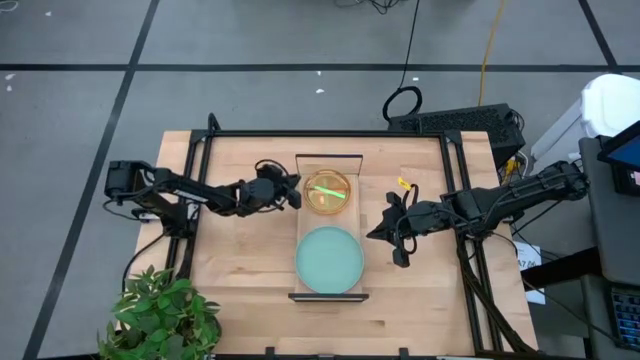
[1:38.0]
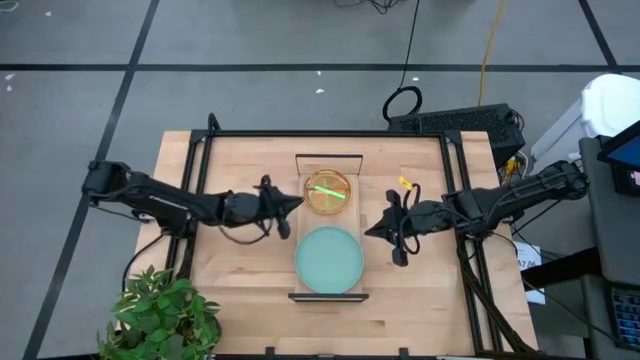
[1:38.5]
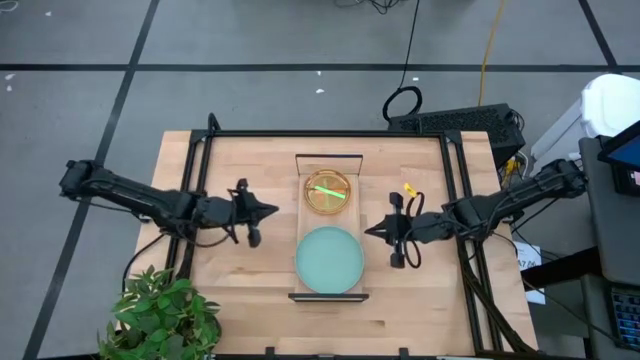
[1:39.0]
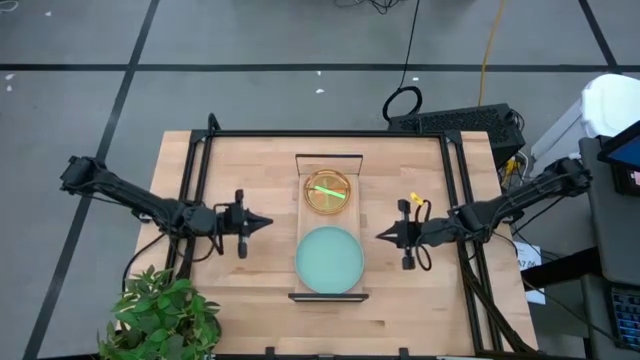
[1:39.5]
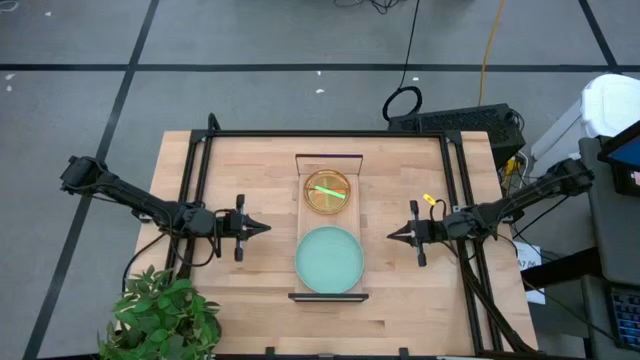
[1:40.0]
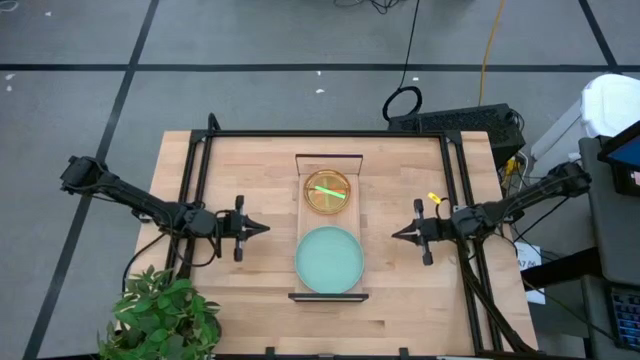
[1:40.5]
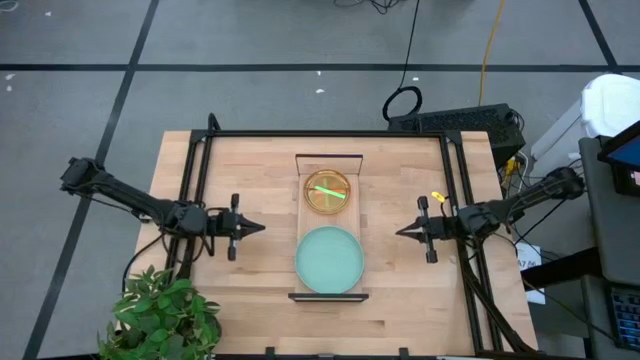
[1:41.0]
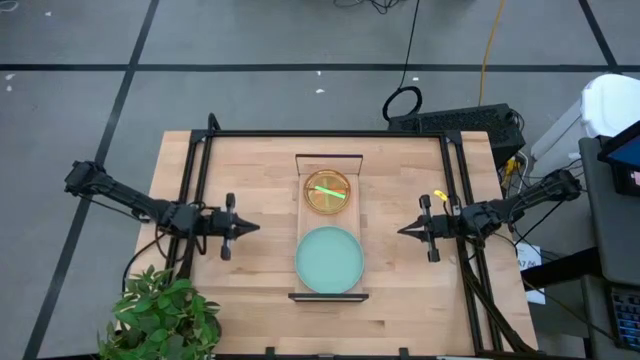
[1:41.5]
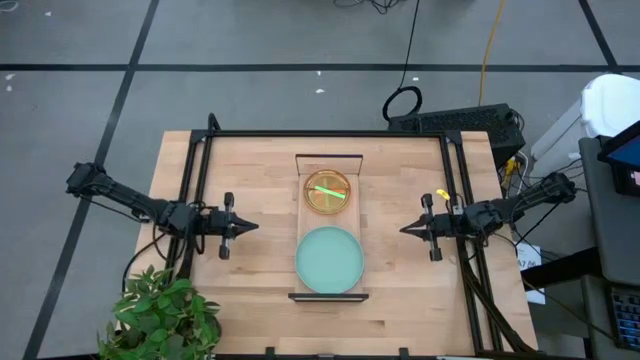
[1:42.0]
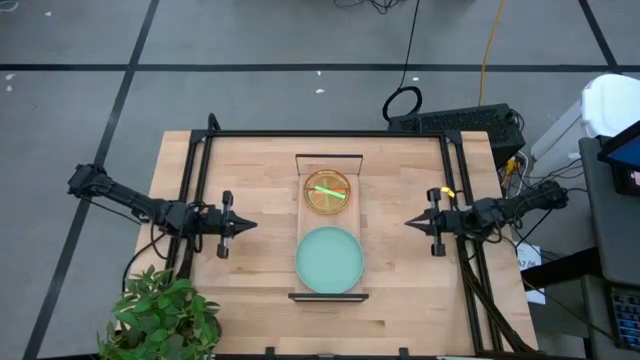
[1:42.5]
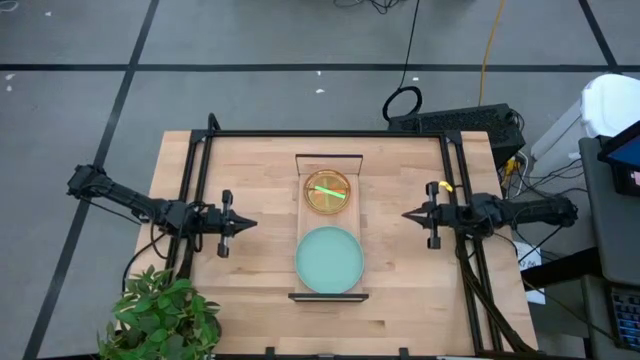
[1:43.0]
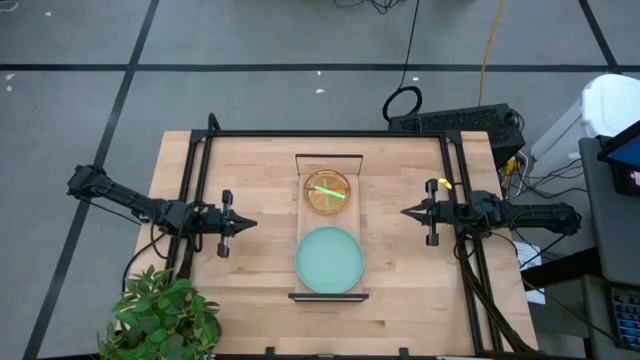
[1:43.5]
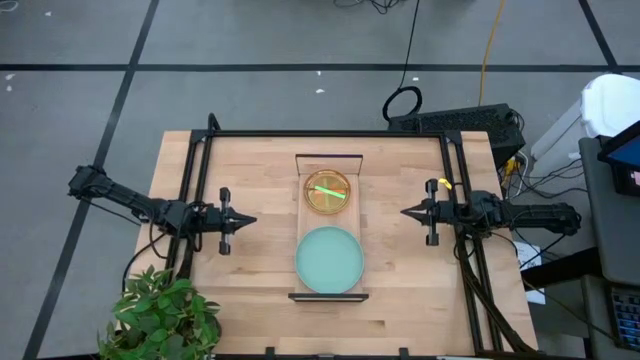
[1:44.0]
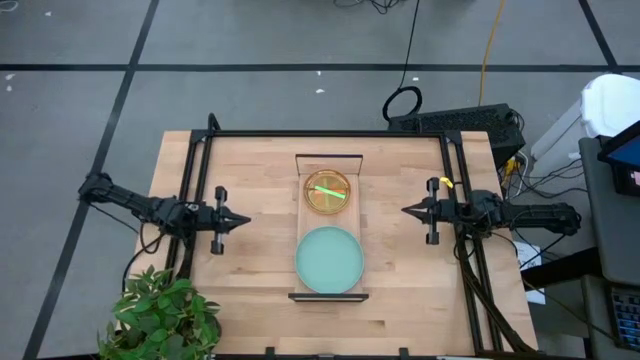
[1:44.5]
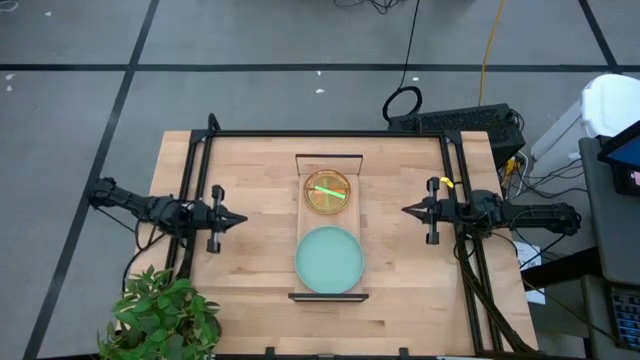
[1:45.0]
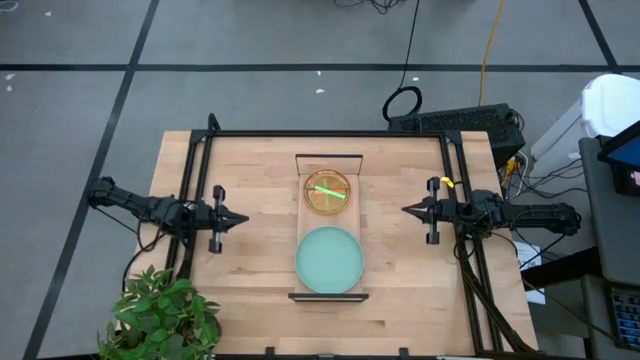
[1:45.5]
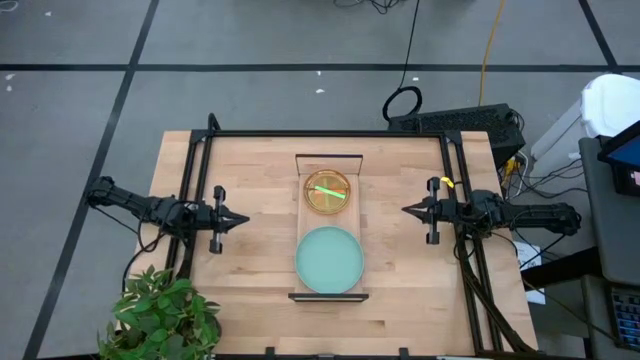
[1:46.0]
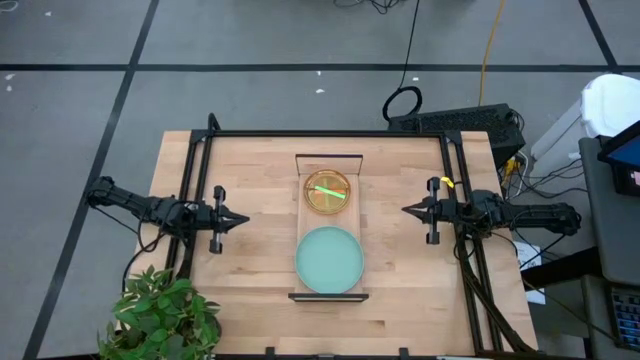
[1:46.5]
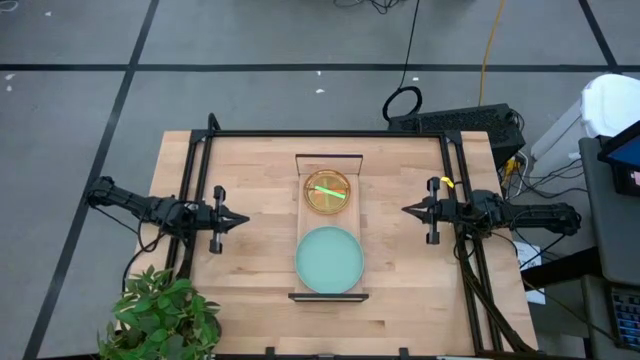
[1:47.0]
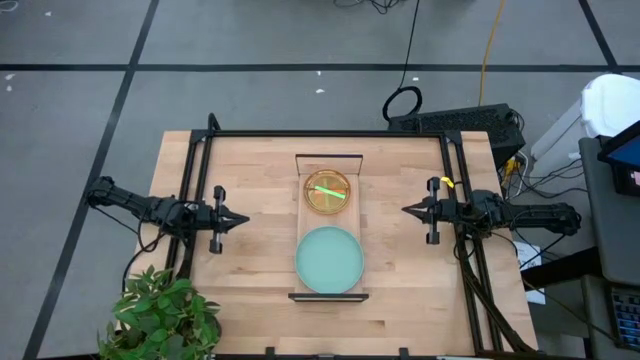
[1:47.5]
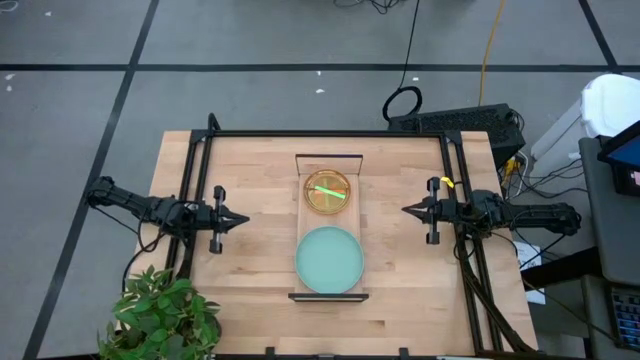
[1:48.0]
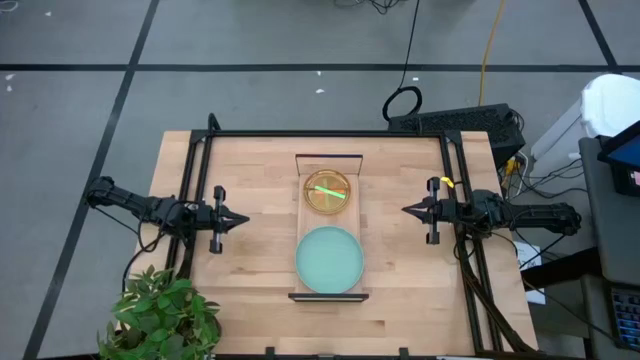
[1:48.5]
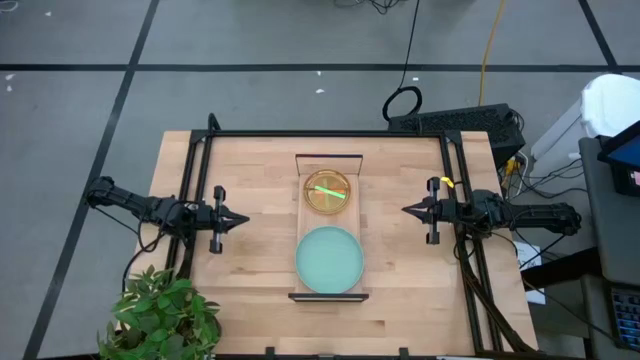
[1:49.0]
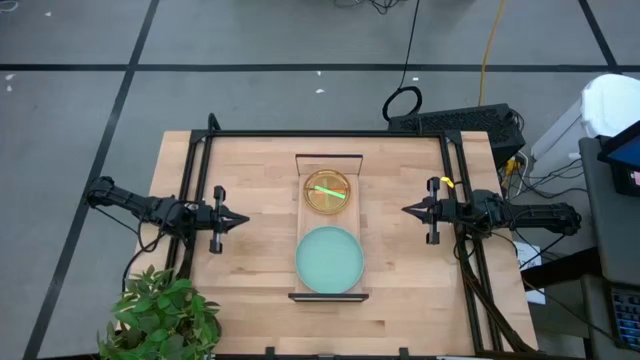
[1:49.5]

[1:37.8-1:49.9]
Task: Place and stack plates onto a shelf
Return to Home Position

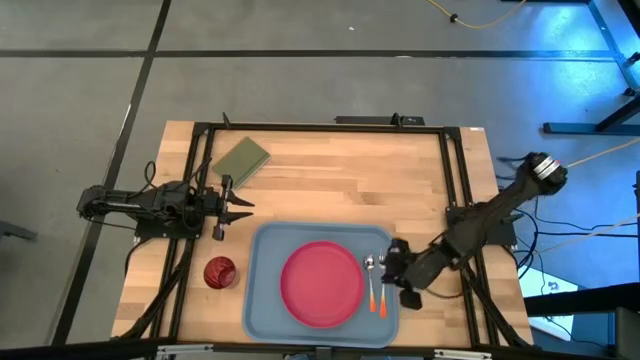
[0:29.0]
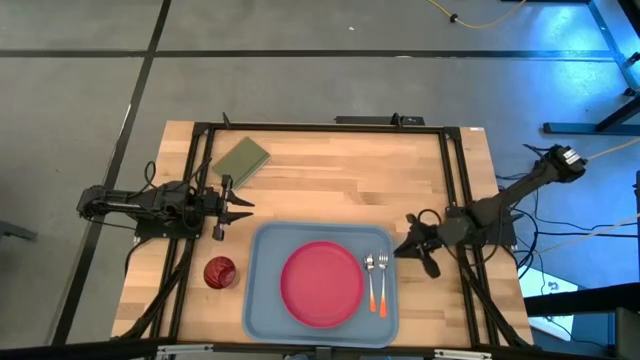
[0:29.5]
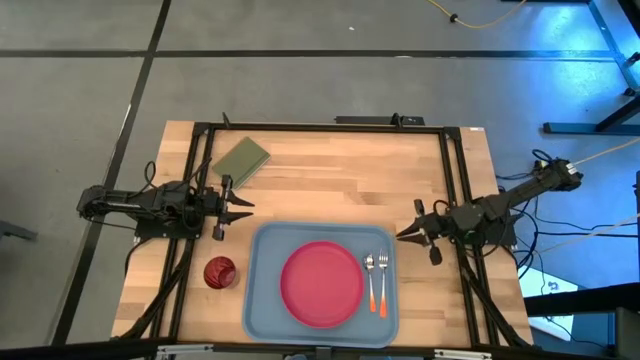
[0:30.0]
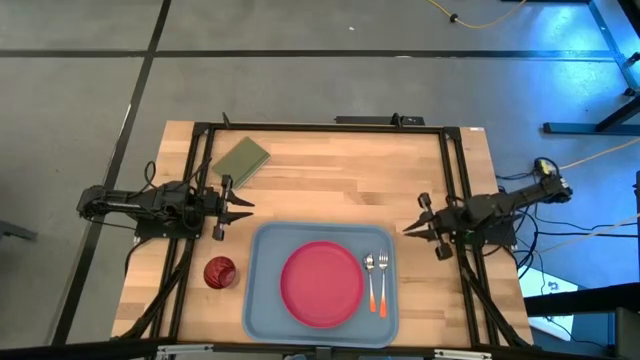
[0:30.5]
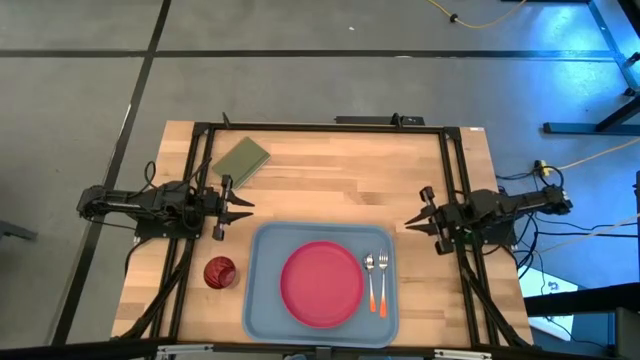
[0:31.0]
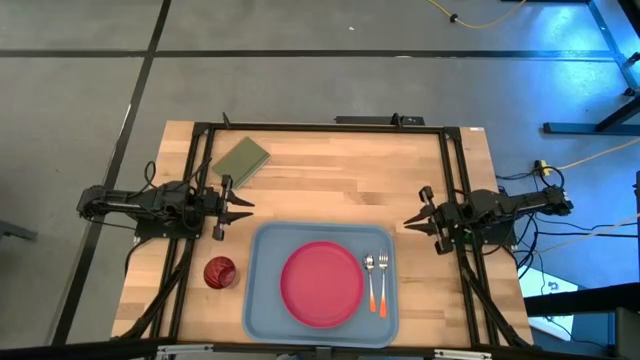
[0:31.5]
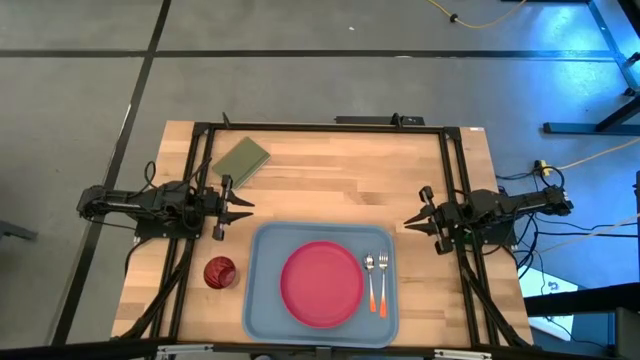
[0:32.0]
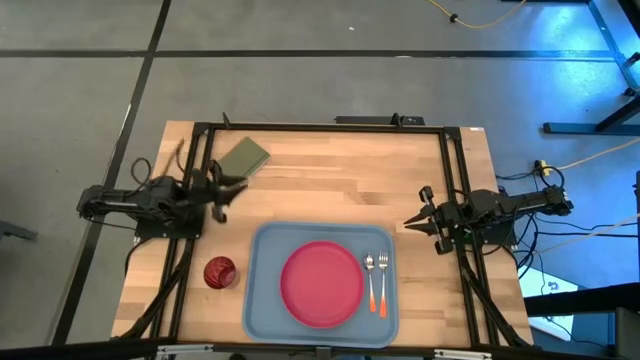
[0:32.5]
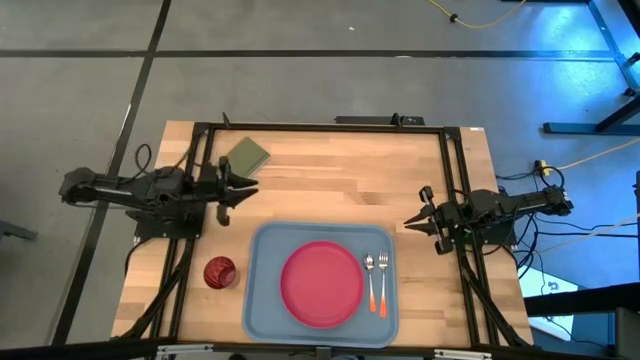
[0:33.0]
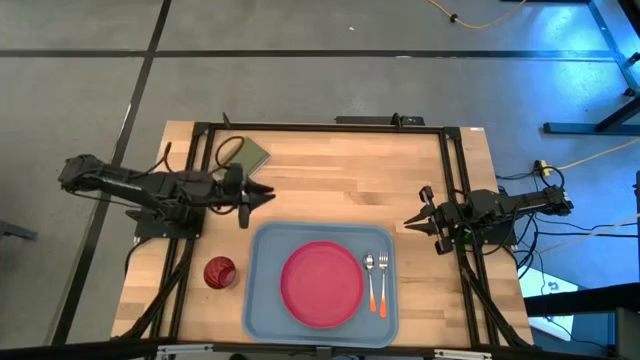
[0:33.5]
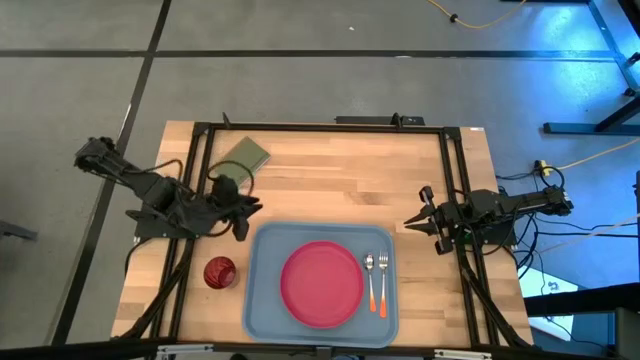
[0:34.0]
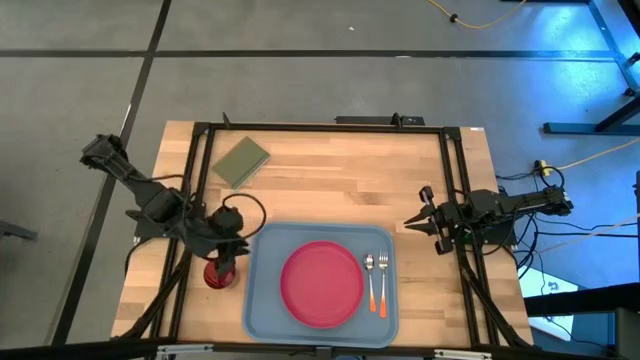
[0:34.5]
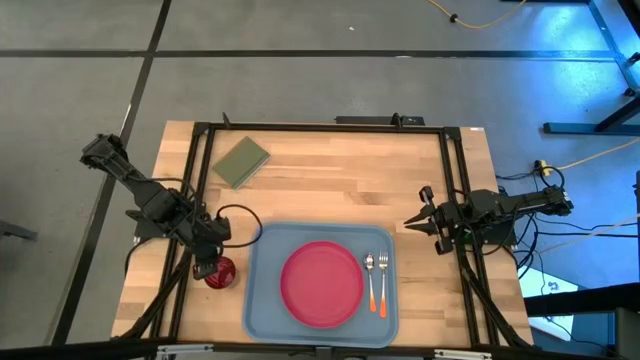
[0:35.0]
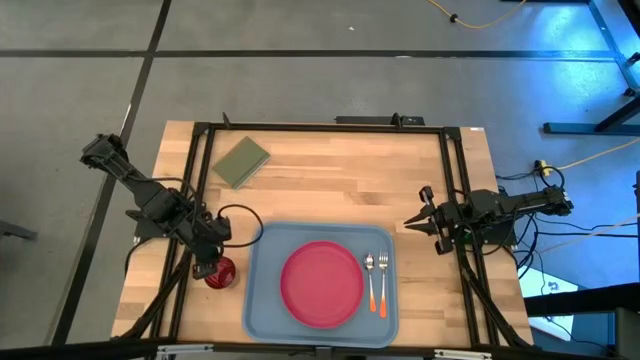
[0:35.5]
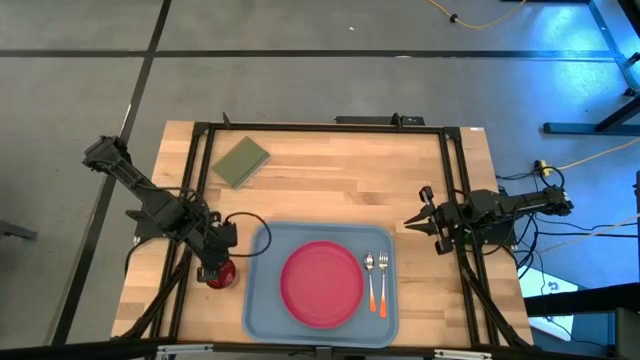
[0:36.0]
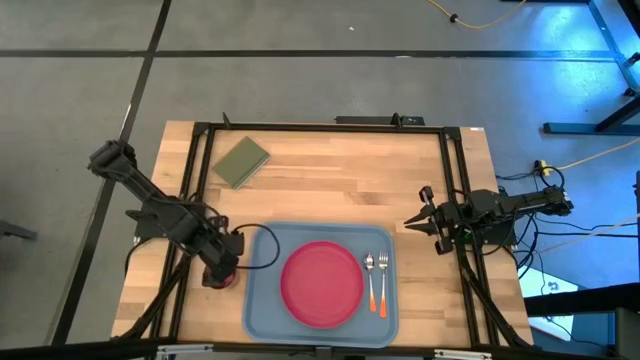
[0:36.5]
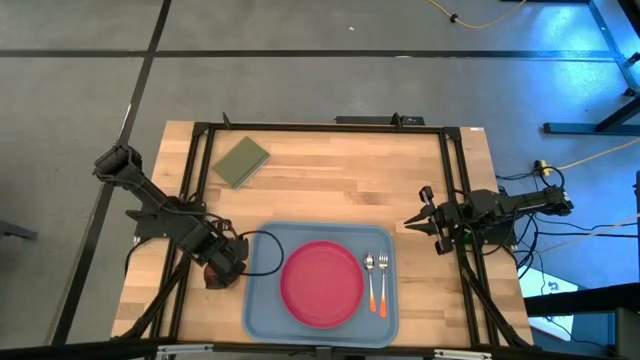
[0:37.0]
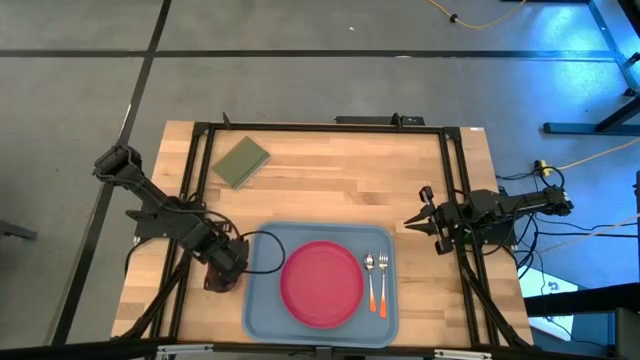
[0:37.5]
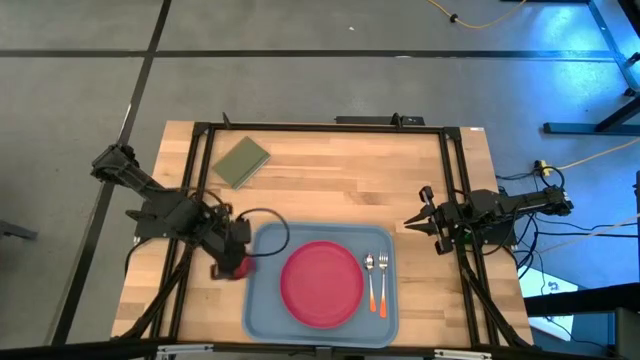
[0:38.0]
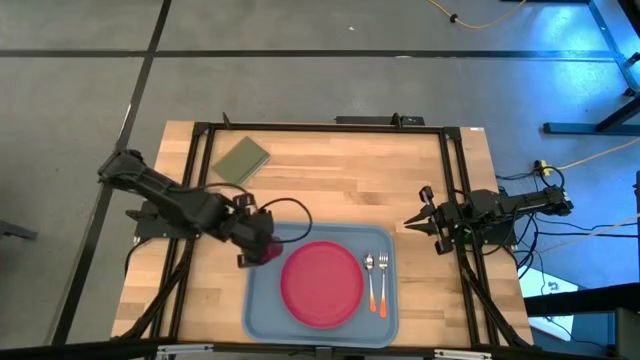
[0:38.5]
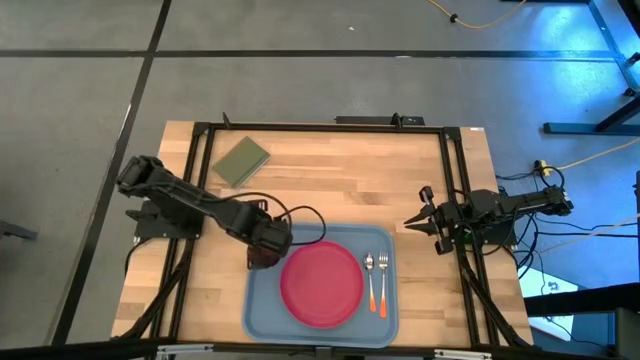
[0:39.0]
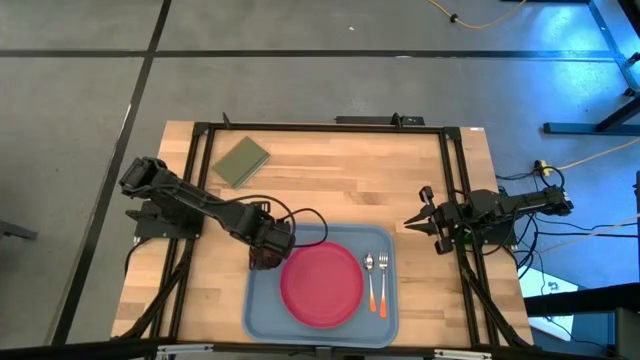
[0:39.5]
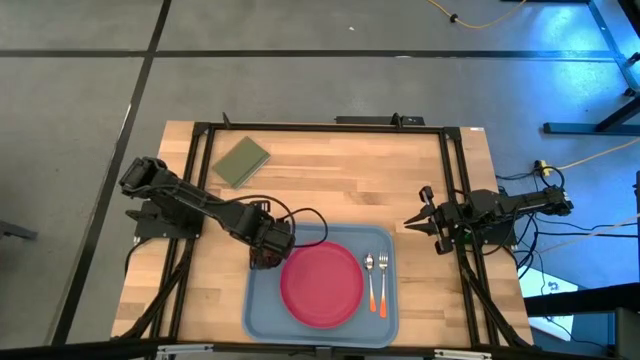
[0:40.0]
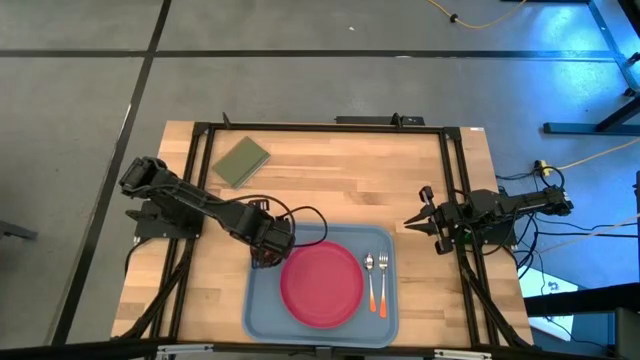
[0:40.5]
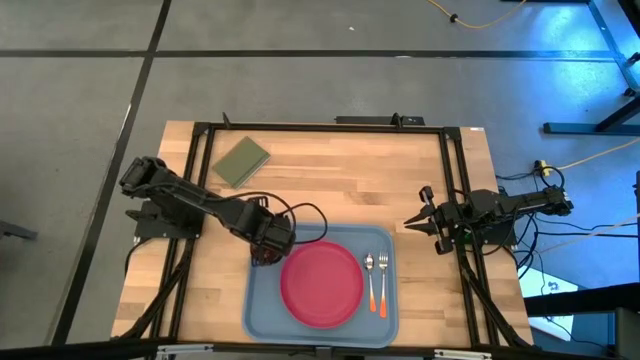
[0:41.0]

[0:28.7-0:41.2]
Task: Pick and place plate/cup/fork/spoon on tray
Put the pink cup on the blue tray to the top left of the pink plate
